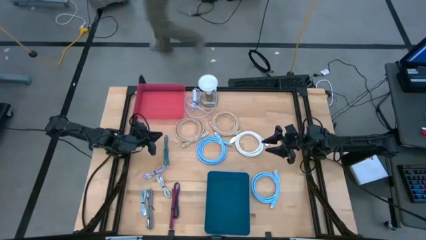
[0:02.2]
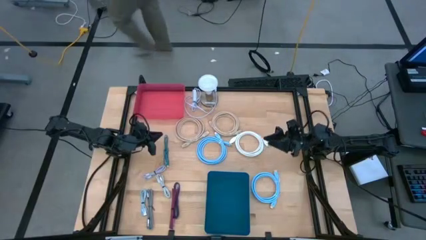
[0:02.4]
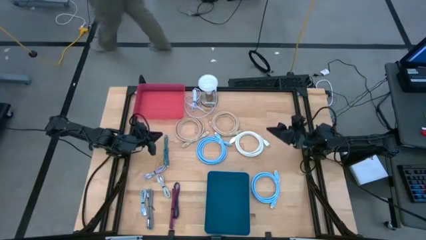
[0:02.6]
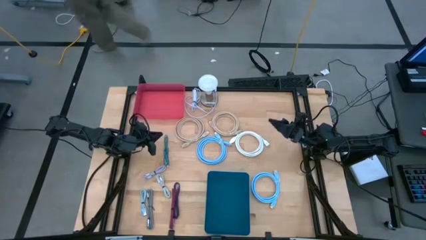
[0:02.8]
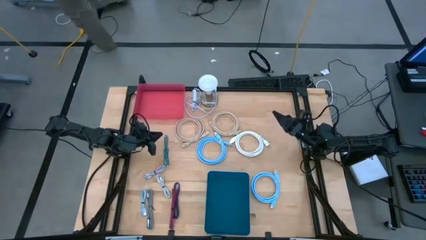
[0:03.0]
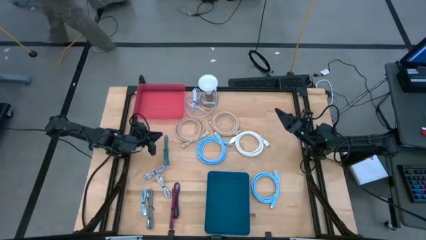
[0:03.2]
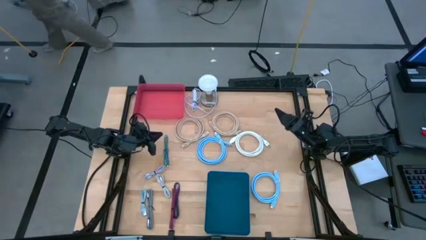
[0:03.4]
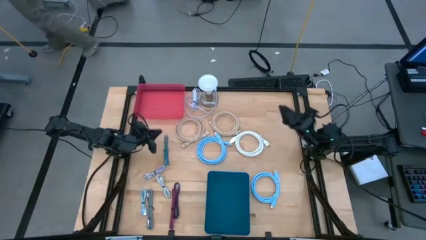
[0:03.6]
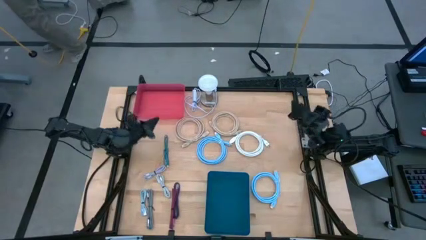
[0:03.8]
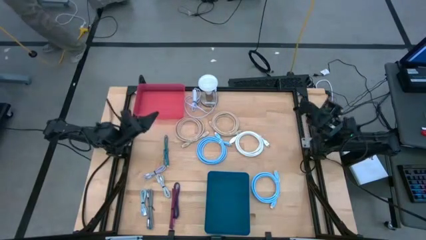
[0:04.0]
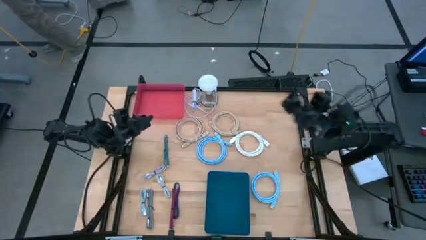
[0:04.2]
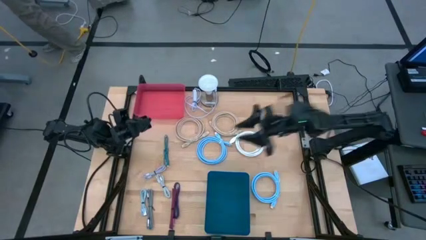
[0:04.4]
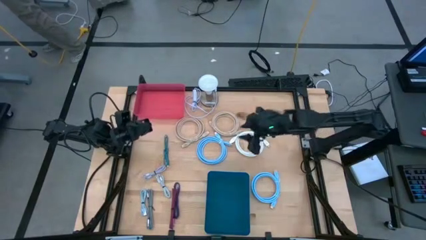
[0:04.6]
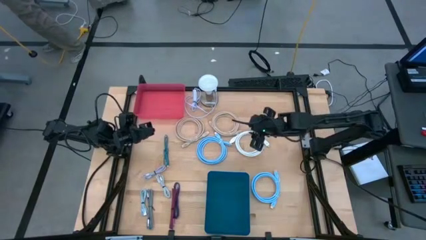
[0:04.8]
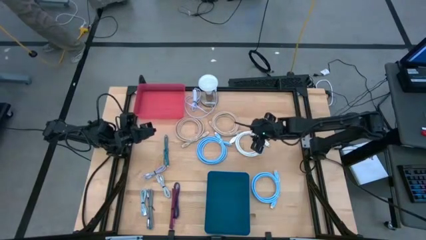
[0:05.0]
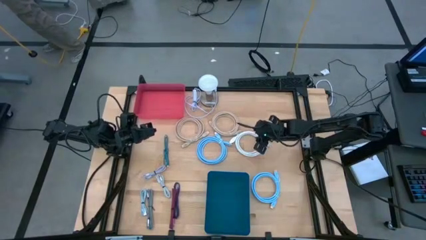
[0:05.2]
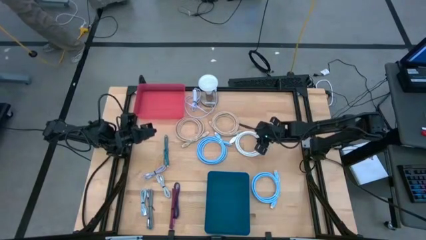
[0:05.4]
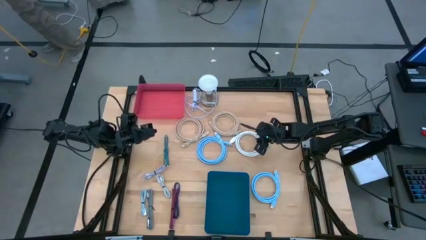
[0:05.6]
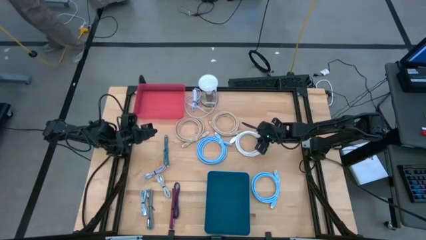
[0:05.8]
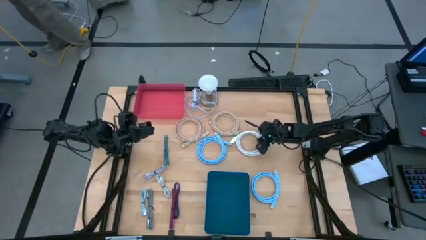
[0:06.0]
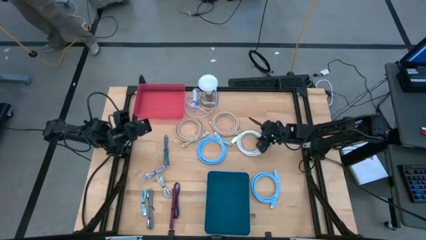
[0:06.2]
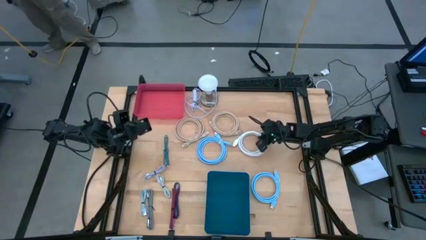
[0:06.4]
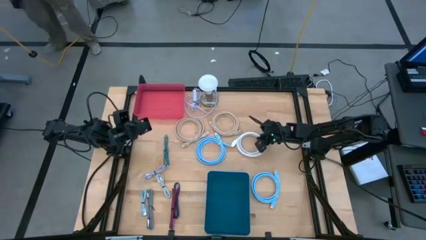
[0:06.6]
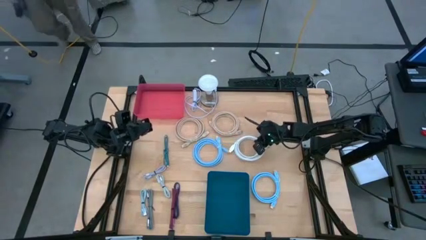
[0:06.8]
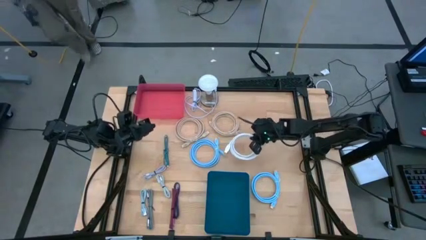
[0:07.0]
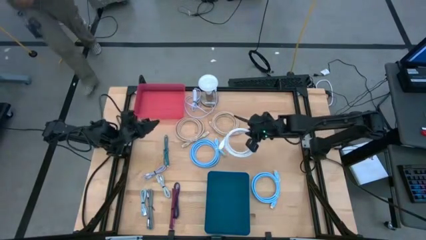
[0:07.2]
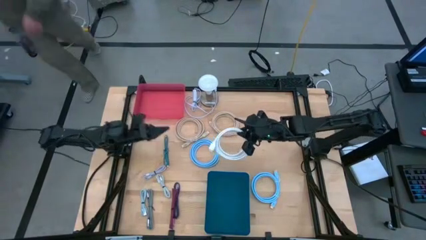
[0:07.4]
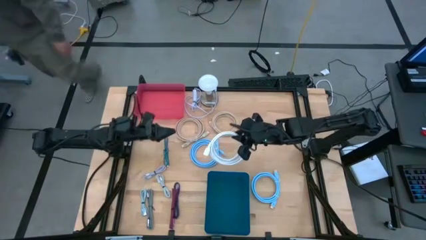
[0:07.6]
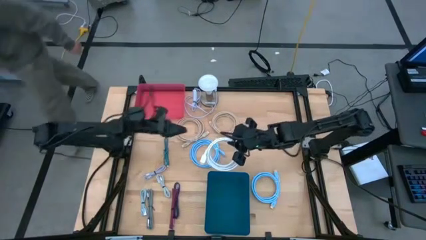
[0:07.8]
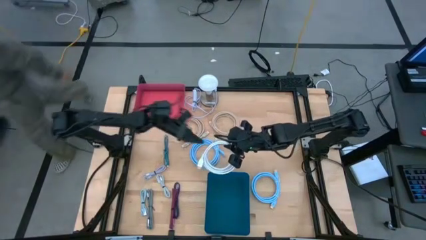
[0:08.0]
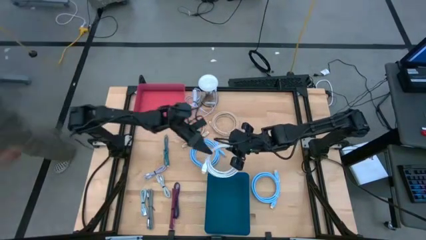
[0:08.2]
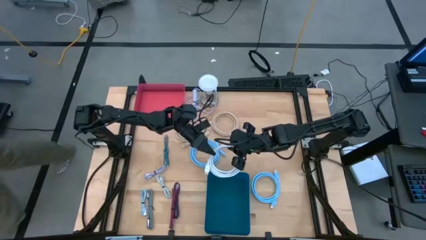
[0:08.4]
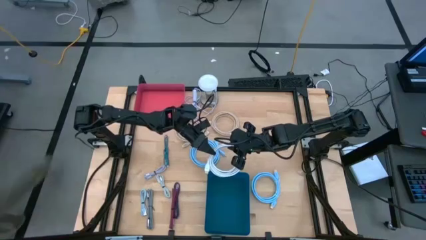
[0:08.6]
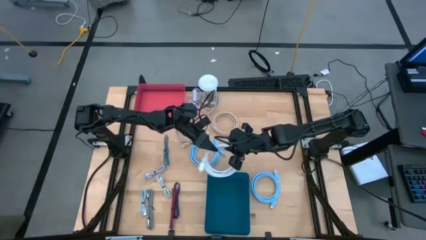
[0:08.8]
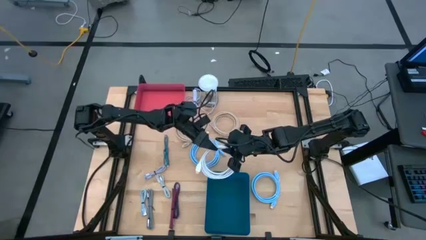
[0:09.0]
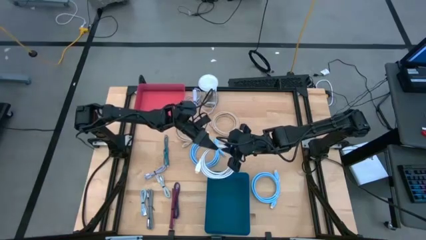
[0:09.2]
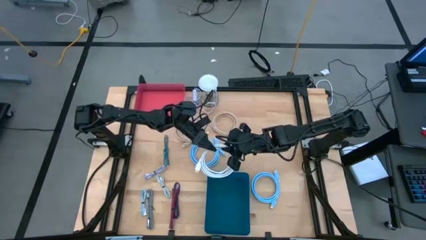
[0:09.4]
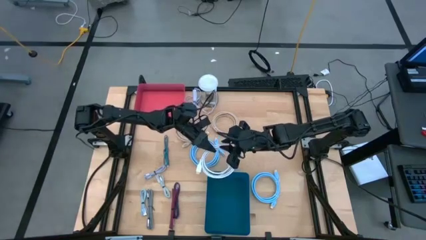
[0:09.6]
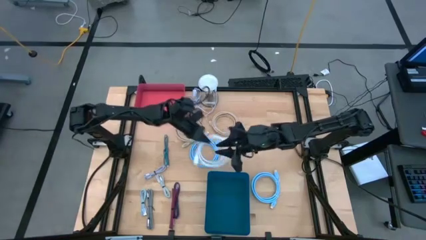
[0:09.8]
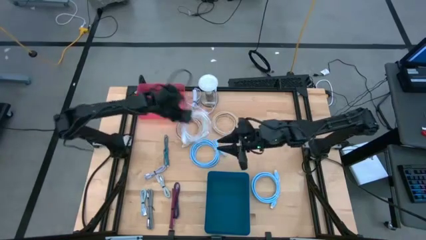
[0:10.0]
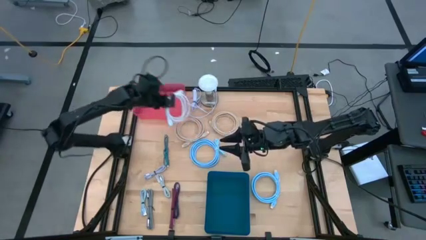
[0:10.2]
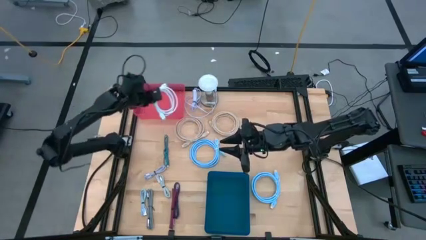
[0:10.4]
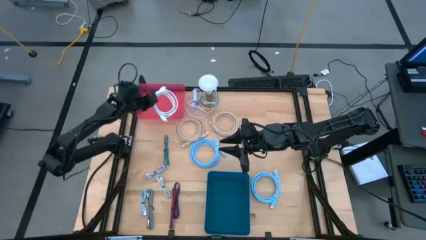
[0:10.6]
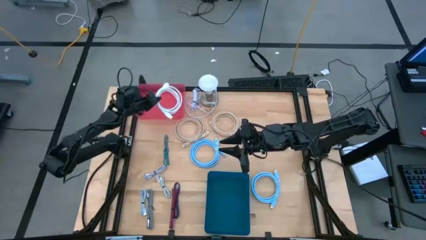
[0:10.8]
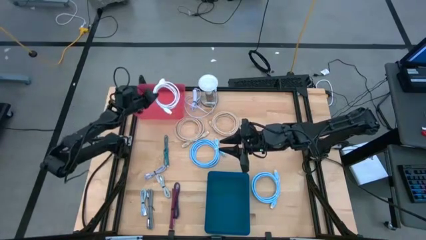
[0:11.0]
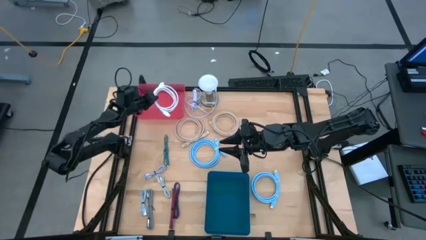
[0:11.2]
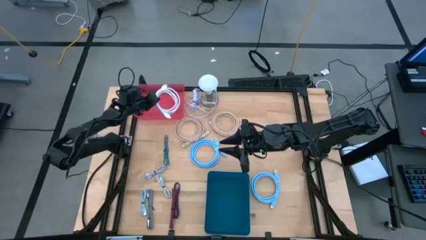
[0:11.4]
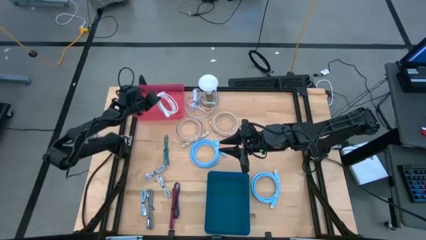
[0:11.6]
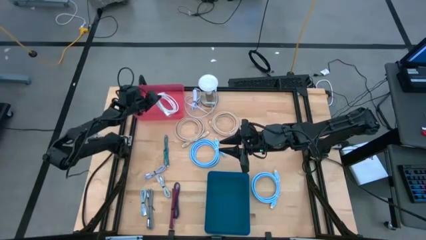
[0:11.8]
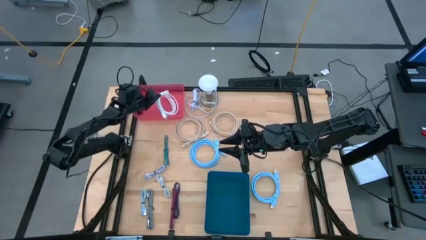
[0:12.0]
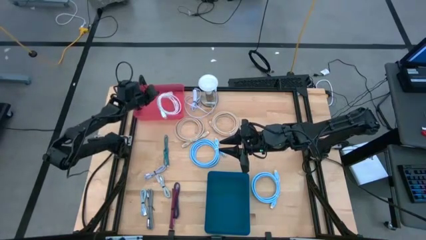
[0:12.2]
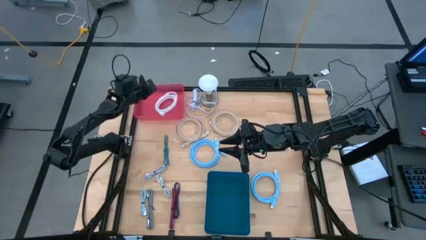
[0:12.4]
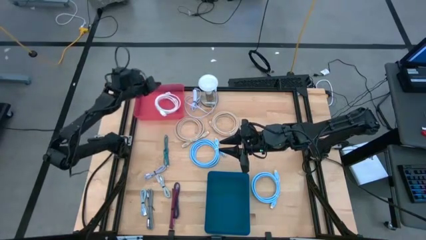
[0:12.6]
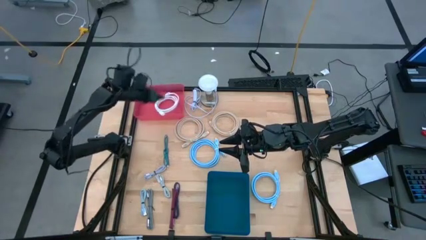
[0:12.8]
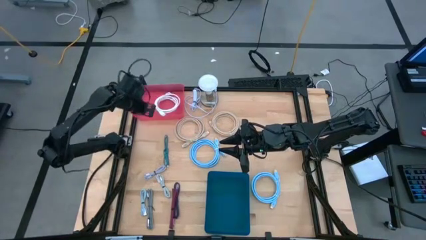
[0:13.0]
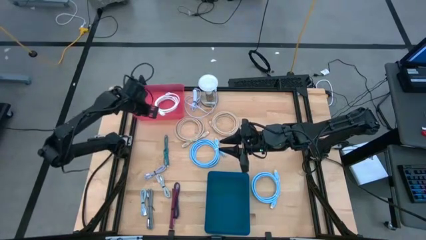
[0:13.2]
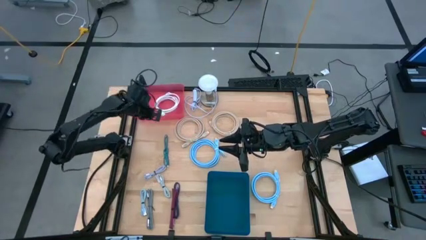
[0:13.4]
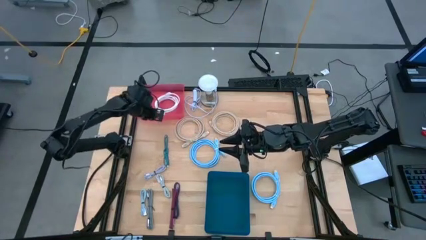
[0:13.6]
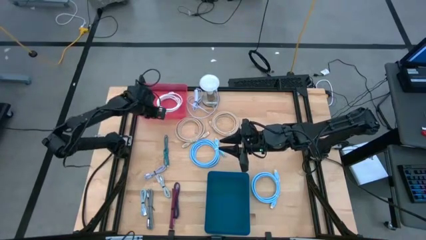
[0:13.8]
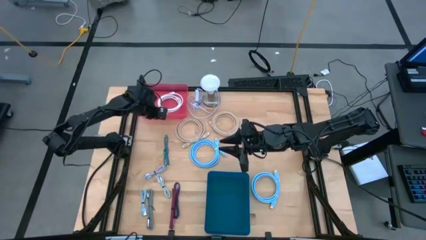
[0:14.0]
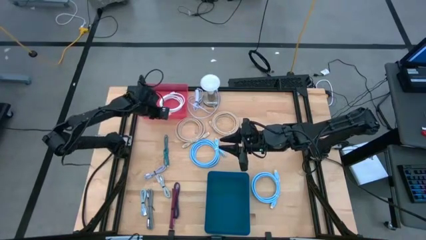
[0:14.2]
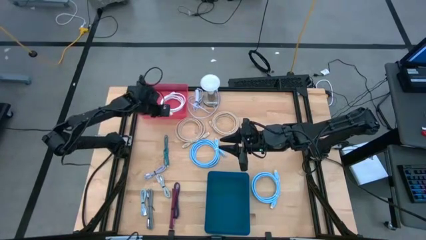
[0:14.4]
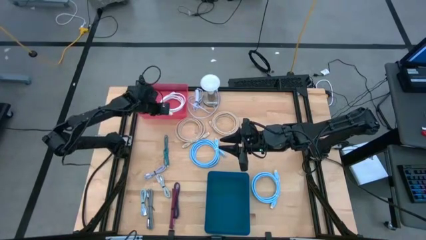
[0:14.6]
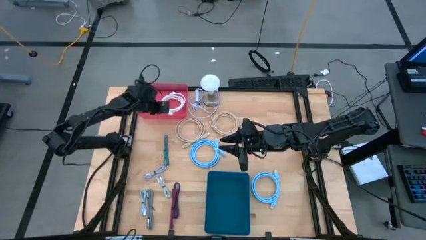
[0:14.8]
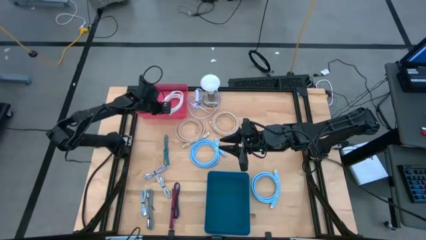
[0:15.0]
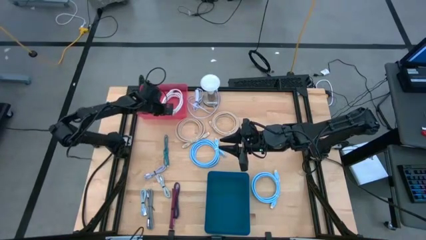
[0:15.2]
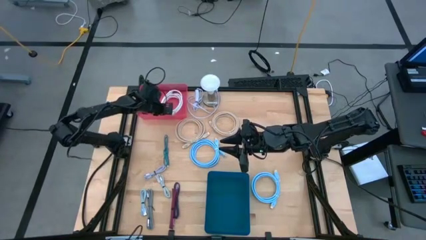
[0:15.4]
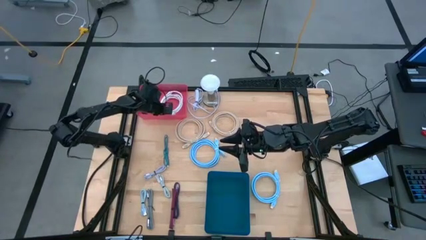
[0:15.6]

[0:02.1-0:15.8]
Task: Pick & Place USB Port
Put the white HDMI cable into the red bin

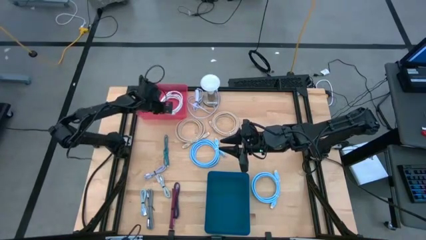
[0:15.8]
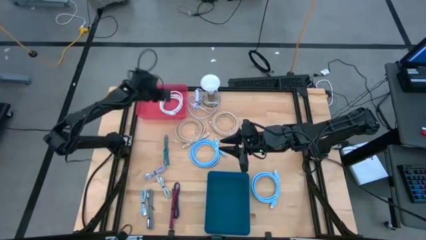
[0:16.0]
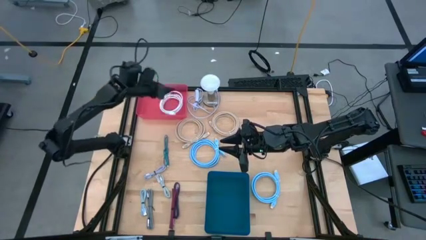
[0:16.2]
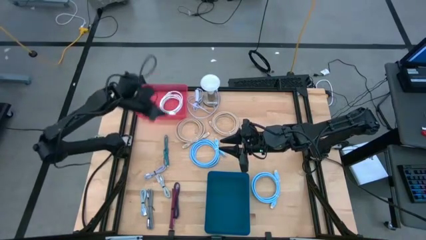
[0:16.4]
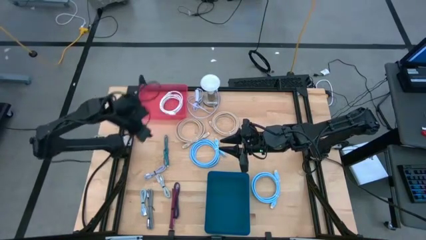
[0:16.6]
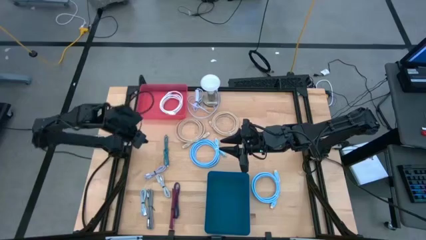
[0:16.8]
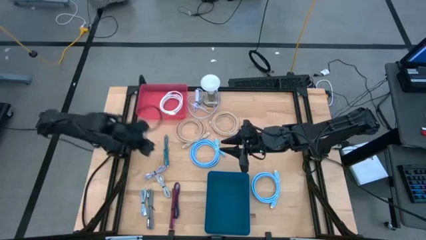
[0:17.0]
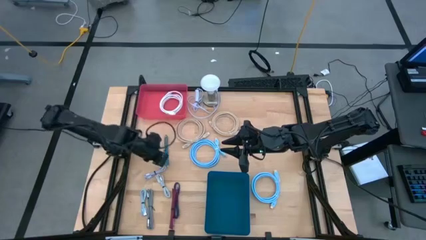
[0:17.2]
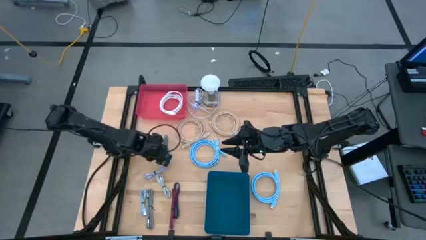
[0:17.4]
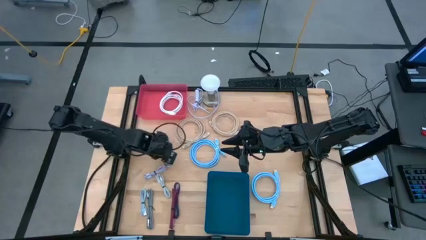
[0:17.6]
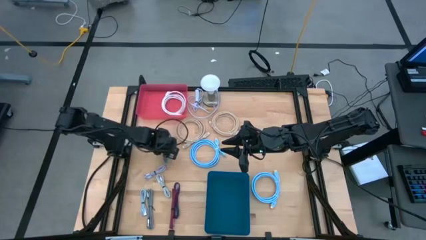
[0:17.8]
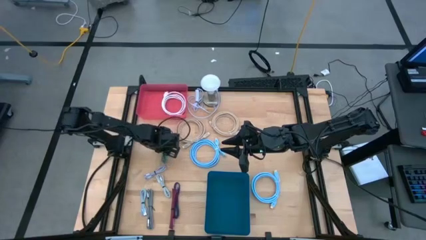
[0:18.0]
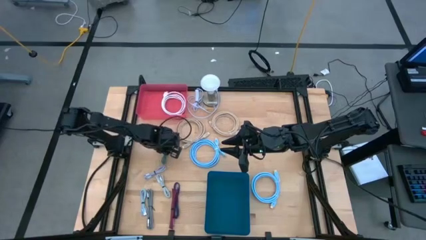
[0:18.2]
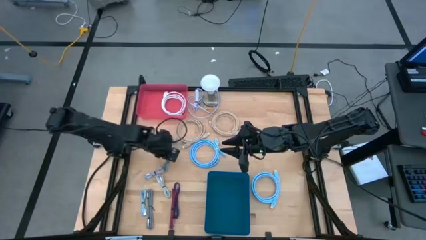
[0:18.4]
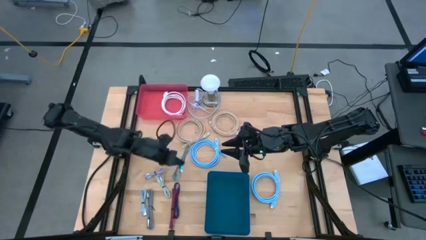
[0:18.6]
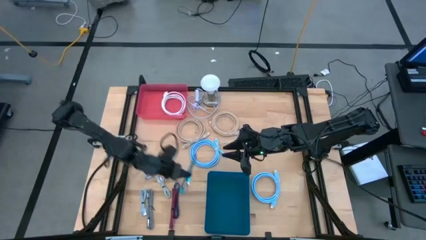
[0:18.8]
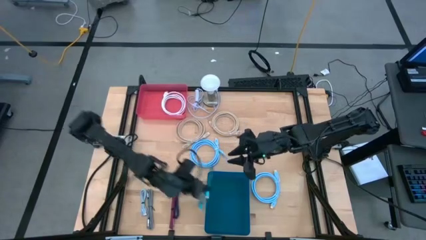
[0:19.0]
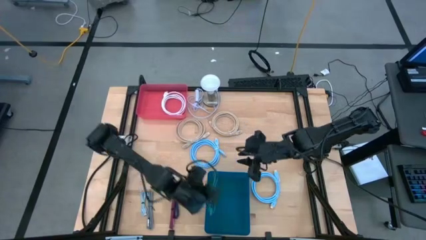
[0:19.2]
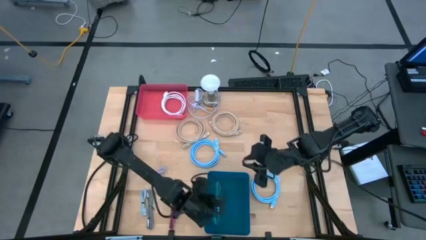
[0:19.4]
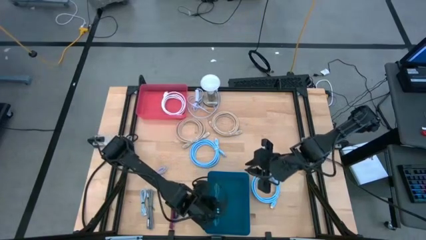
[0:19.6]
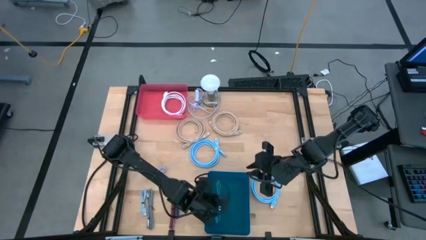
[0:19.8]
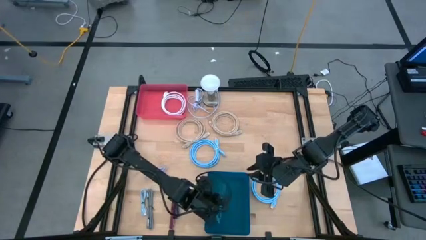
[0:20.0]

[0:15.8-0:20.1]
Put the blue USB cable into the blue bin
